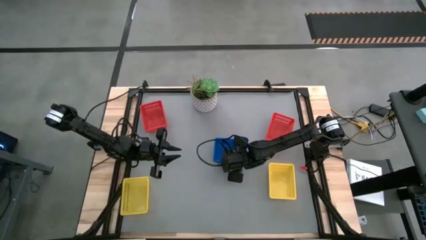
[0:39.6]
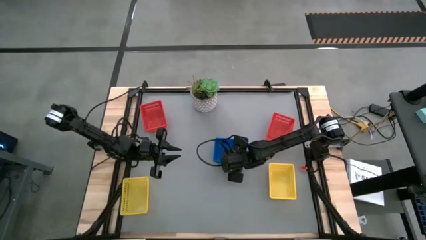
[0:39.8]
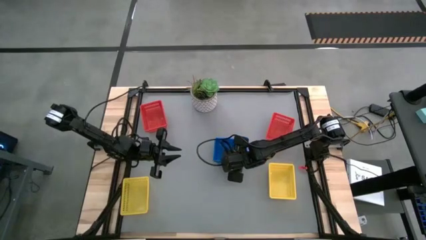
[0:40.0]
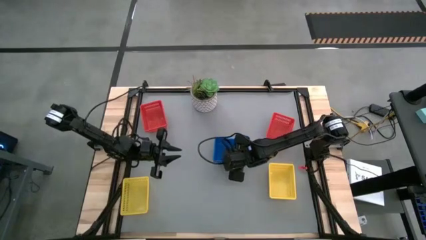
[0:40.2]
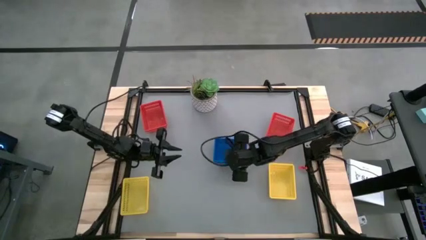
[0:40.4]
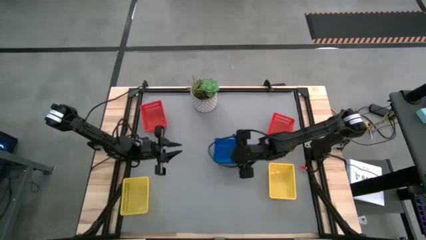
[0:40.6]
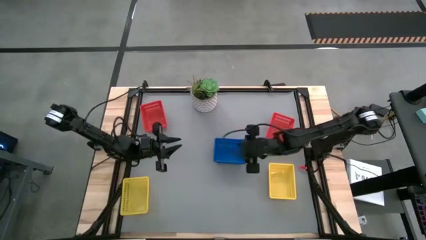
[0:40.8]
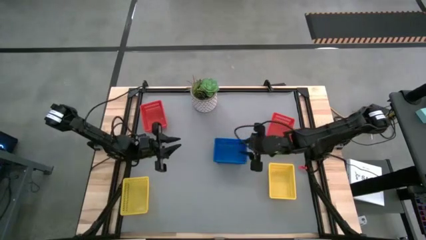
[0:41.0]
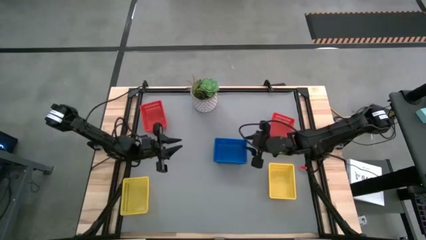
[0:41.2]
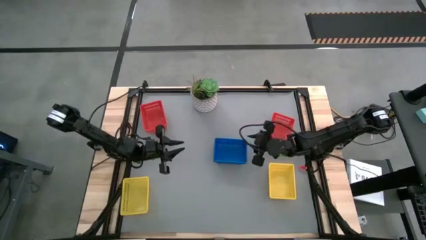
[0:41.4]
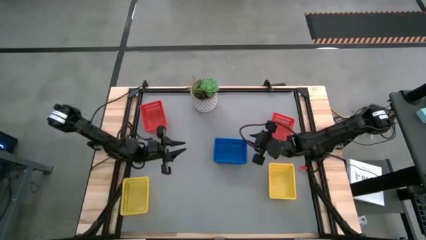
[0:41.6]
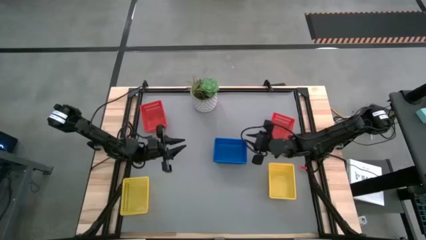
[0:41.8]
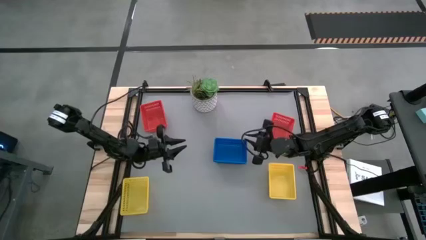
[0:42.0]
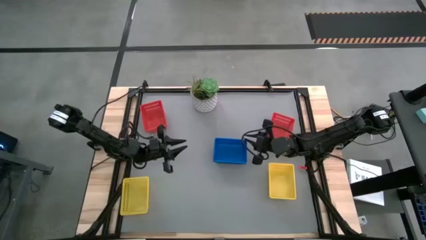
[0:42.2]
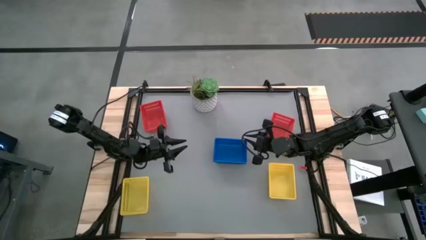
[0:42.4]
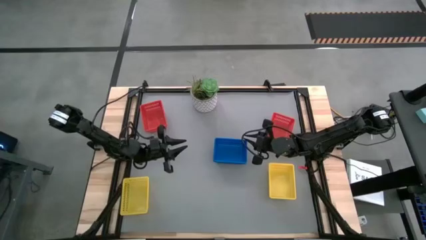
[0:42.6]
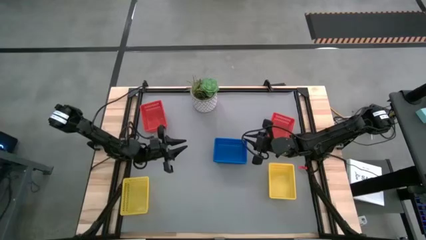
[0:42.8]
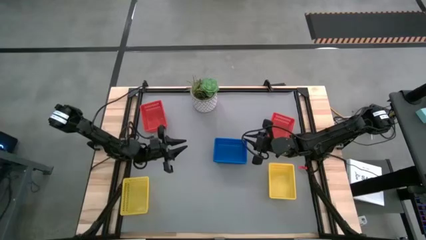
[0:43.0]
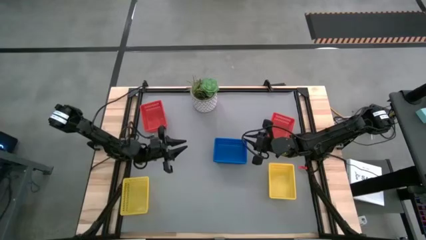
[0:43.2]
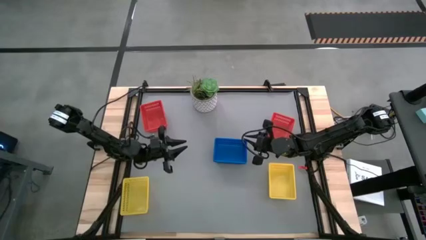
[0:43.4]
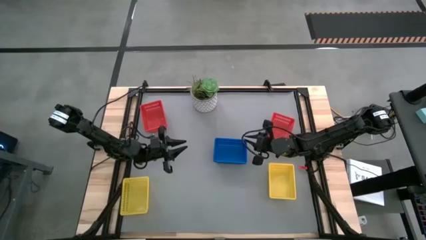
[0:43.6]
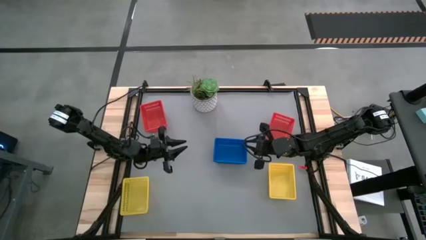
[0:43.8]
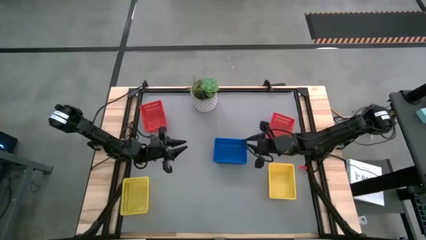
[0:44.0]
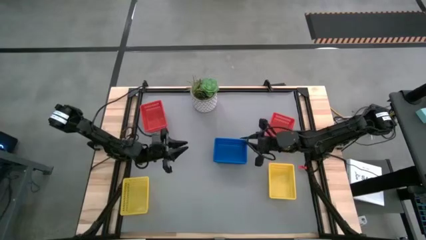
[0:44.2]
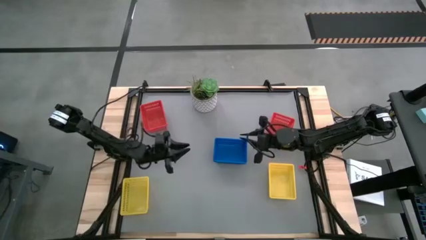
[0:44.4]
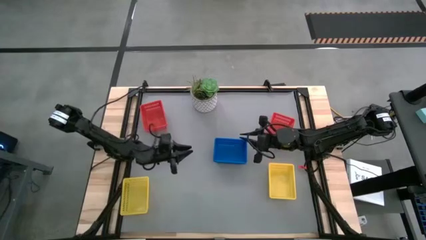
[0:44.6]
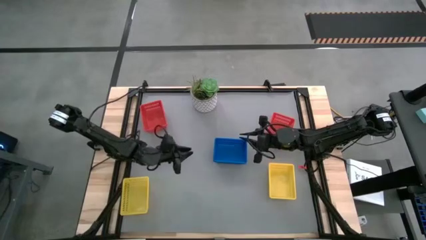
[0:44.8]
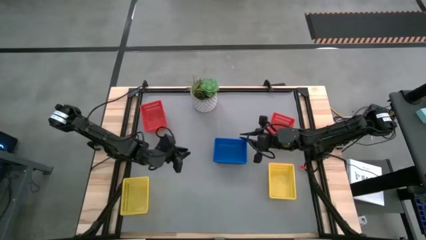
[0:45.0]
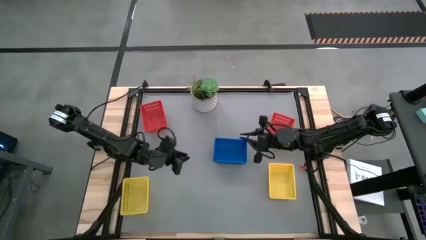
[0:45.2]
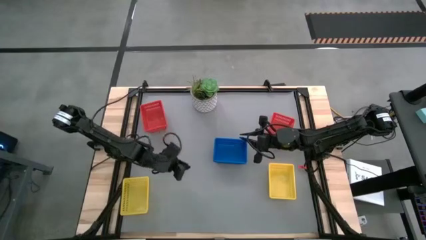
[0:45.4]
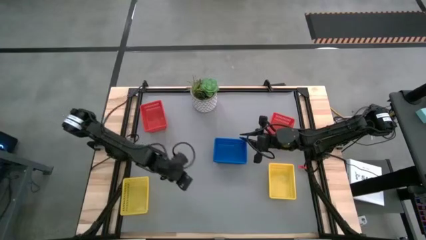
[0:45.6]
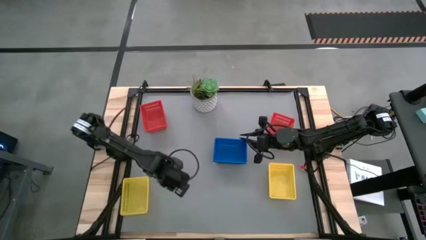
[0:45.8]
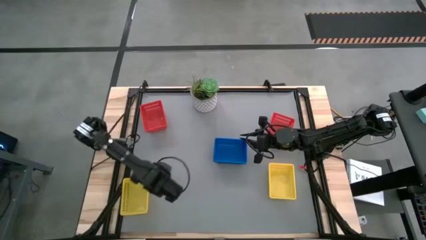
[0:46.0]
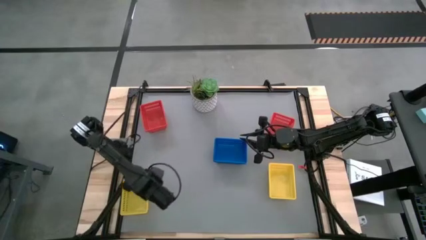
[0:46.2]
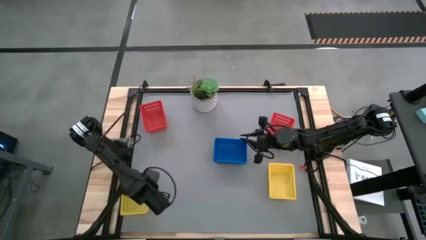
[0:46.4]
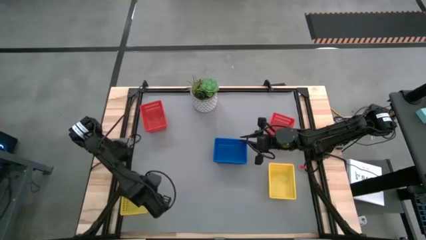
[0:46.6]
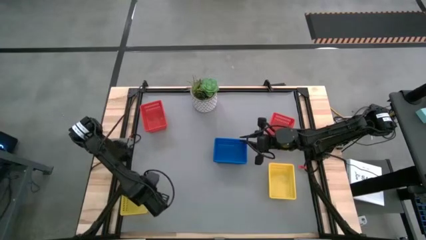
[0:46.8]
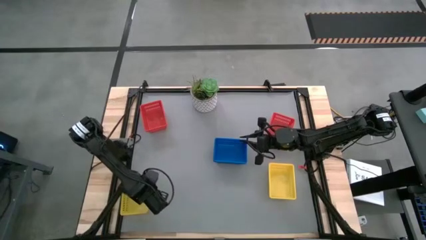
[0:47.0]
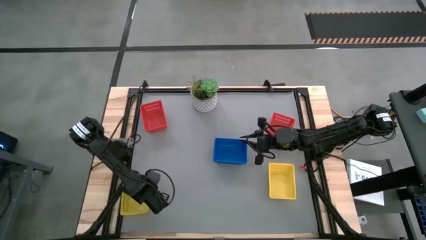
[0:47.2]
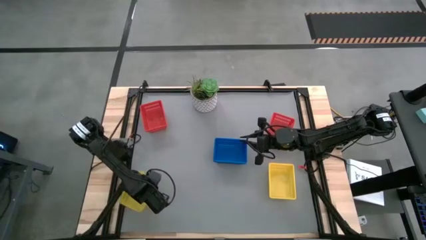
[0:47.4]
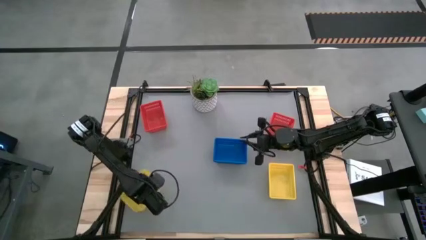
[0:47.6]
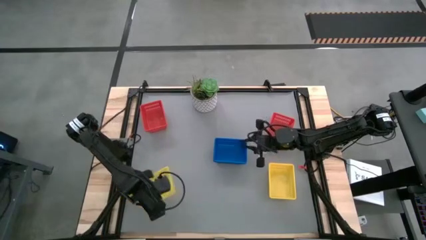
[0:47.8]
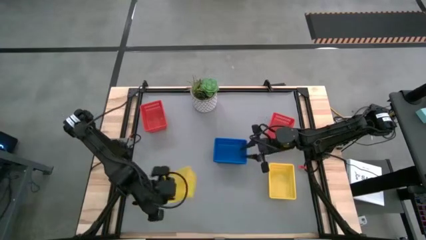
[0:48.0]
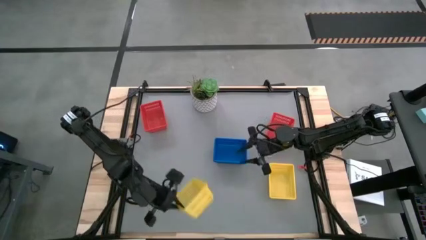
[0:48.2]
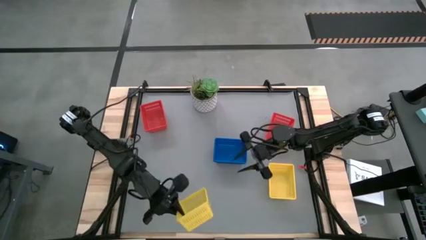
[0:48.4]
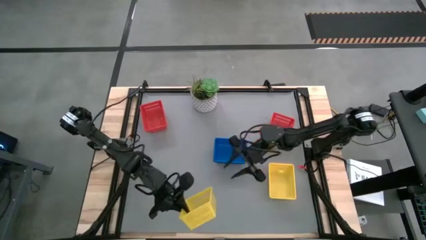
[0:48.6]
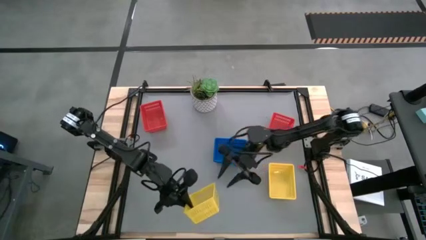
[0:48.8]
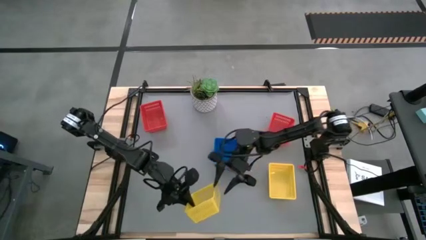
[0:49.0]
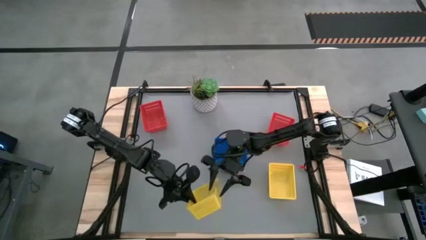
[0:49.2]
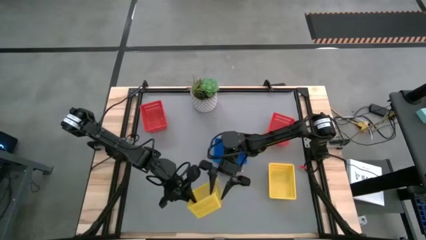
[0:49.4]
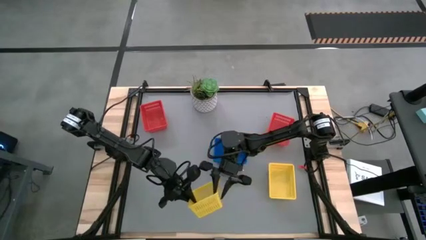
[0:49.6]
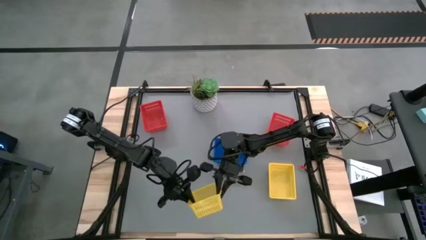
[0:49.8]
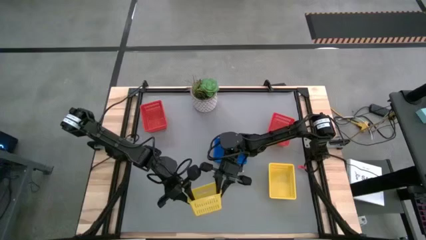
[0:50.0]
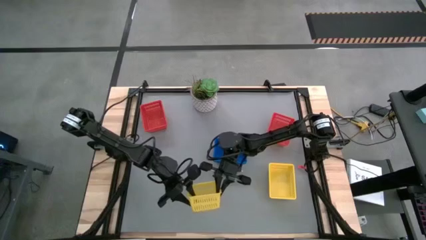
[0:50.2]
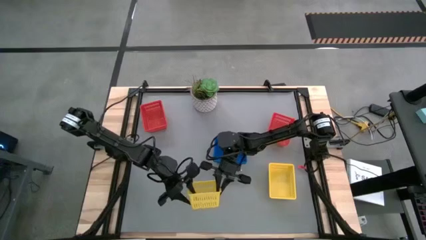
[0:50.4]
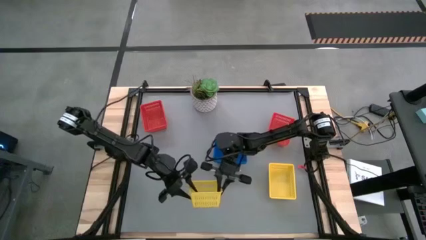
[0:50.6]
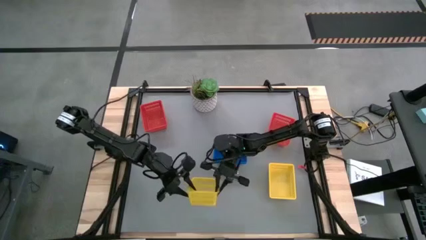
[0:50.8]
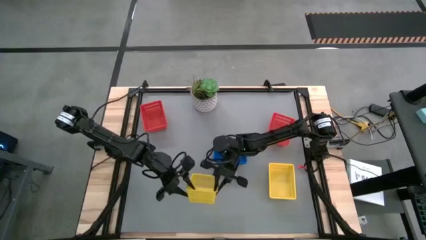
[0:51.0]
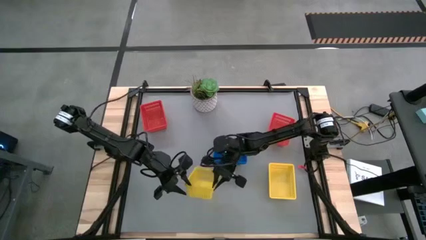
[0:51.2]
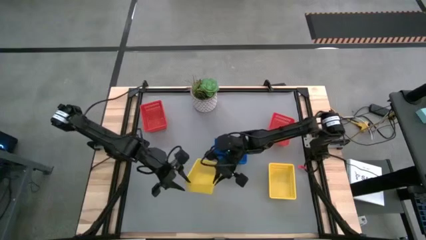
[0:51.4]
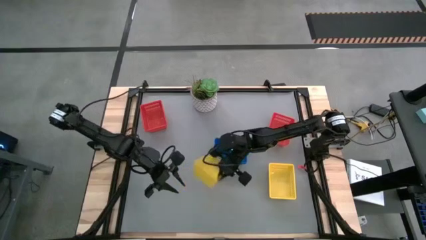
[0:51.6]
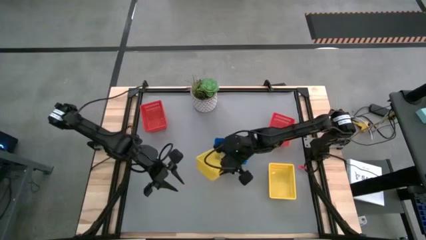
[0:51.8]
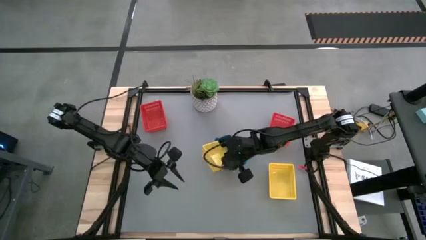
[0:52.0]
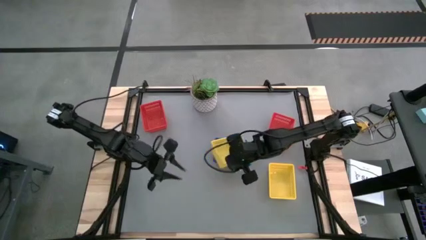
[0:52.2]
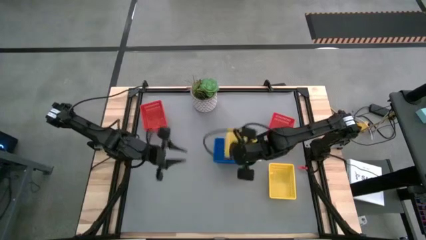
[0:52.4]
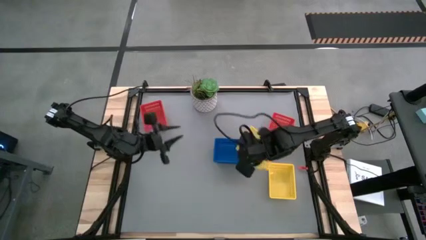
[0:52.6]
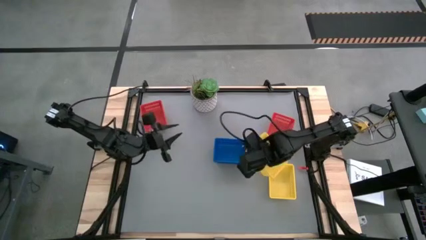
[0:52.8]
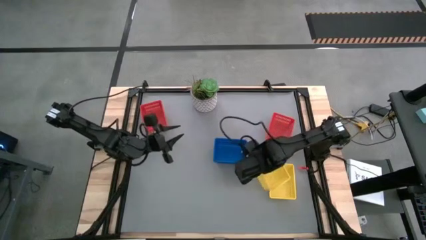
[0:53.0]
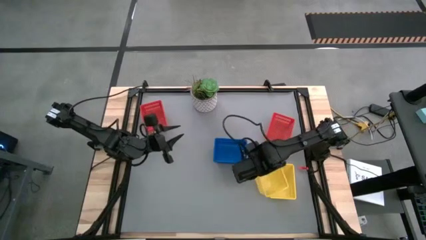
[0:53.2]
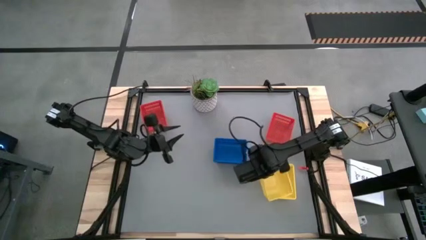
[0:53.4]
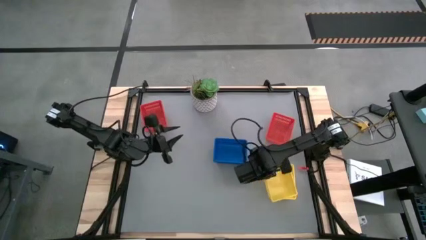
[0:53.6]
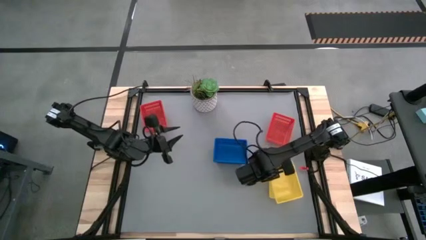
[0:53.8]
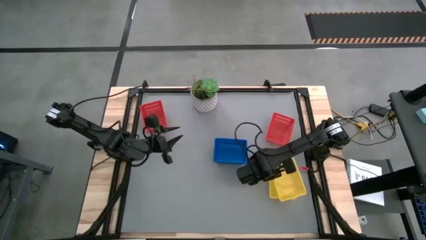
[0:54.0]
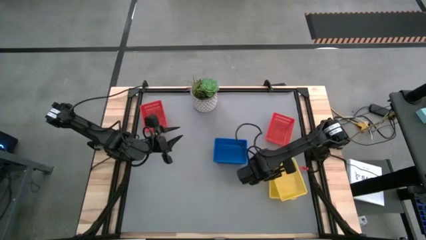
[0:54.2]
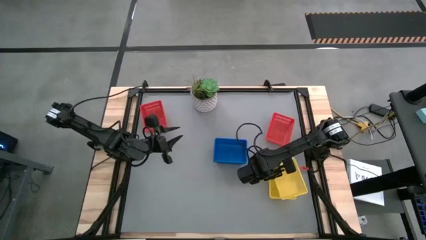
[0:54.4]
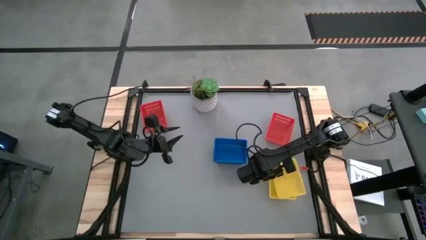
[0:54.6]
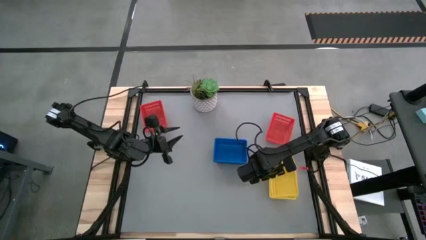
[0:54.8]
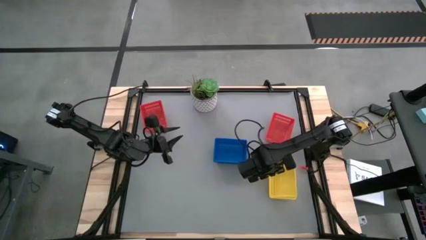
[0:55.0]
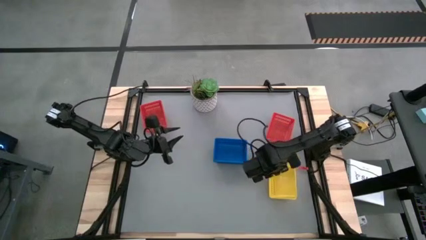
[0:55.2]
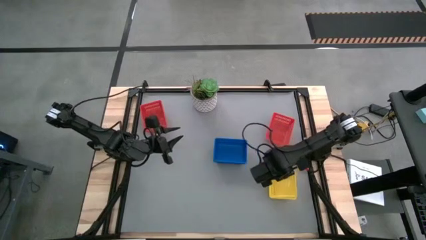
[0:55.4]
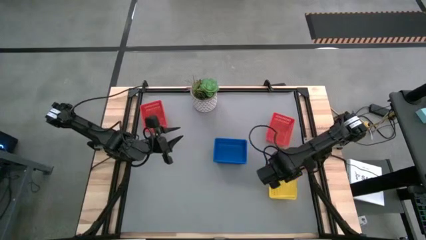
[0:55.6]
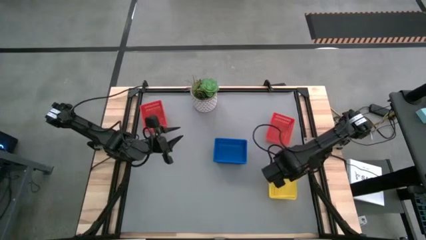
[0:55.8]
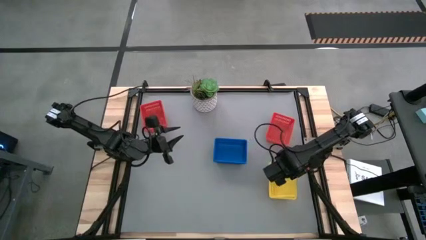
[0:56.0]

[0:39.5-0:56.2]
Stack the left yellow basket on the yellow baskets
